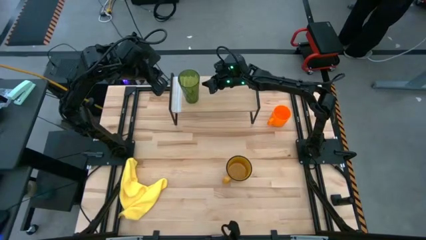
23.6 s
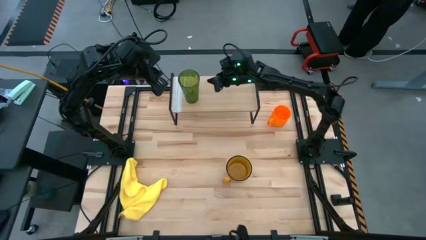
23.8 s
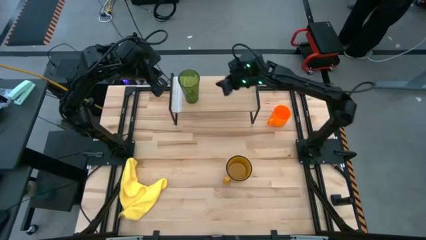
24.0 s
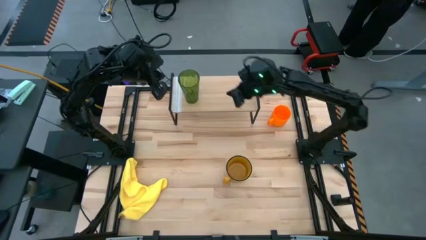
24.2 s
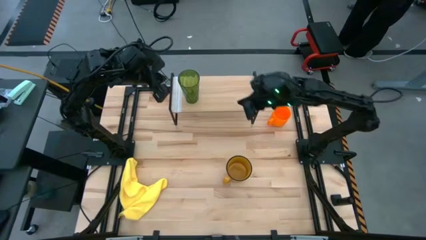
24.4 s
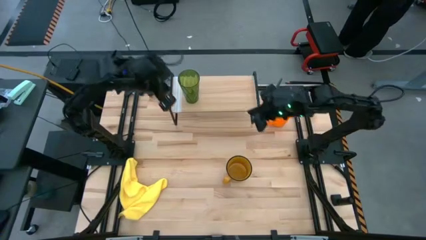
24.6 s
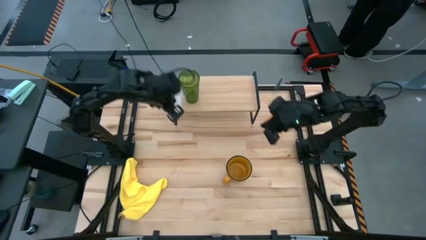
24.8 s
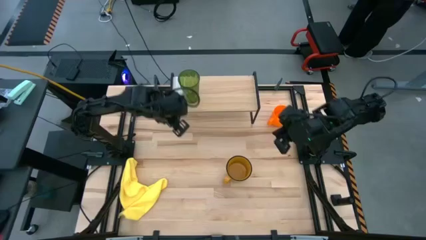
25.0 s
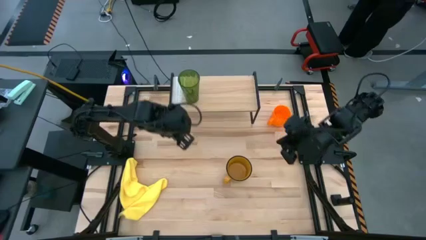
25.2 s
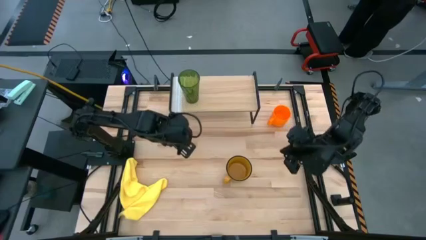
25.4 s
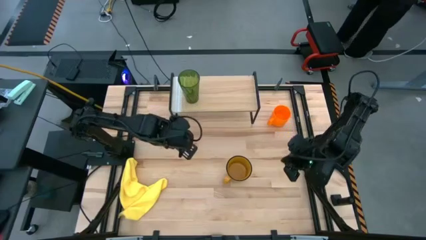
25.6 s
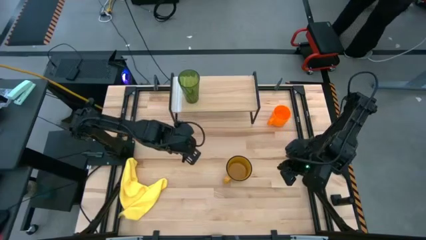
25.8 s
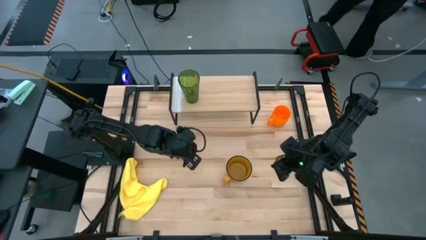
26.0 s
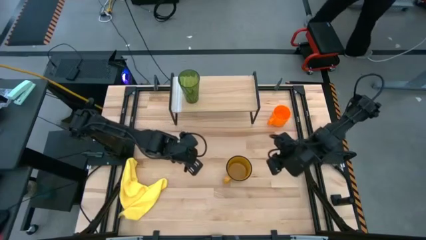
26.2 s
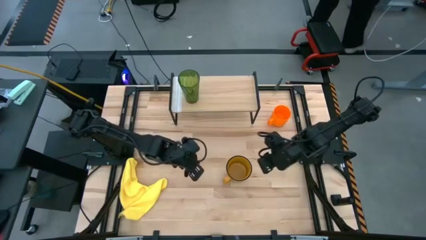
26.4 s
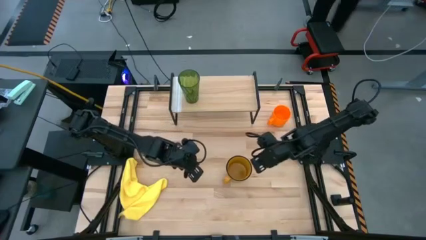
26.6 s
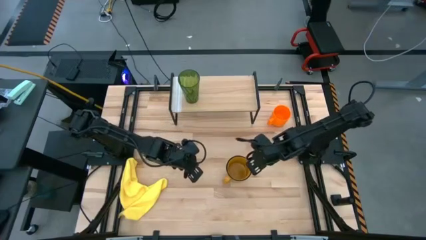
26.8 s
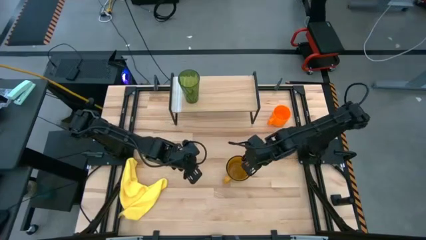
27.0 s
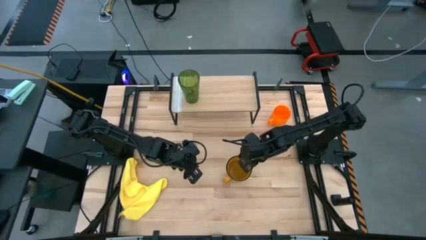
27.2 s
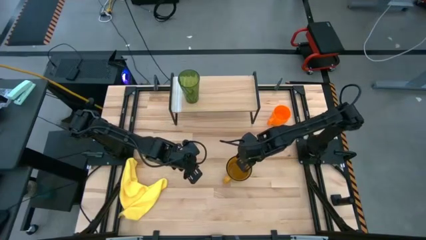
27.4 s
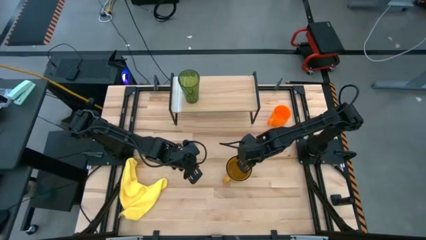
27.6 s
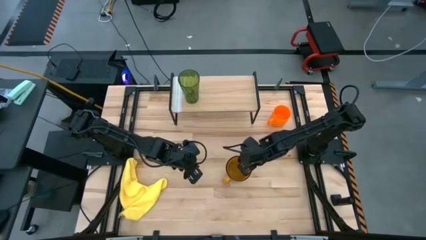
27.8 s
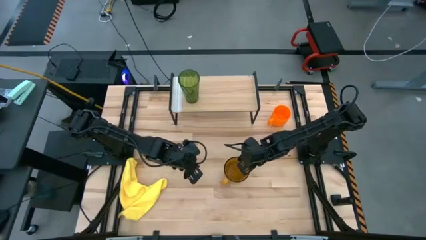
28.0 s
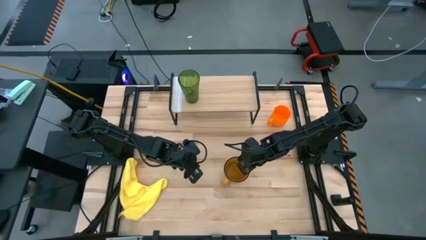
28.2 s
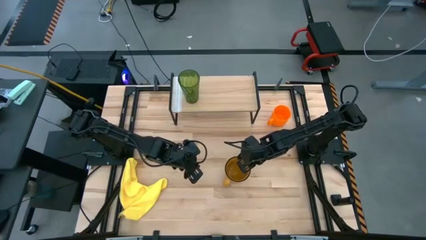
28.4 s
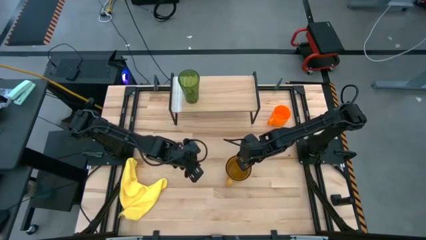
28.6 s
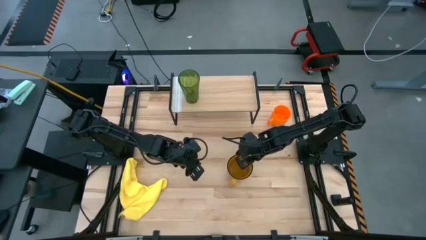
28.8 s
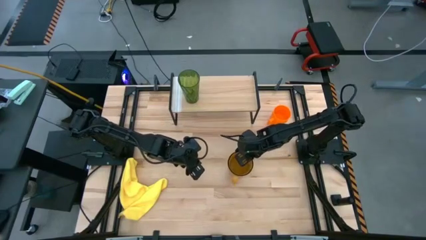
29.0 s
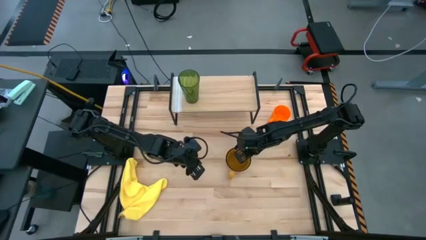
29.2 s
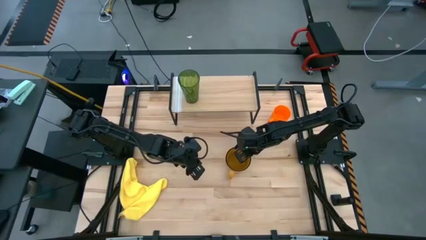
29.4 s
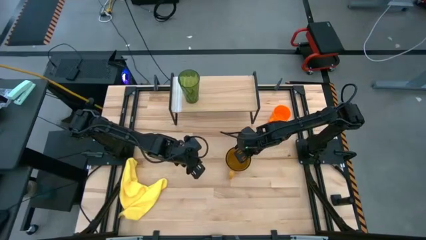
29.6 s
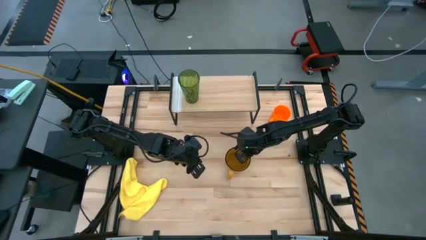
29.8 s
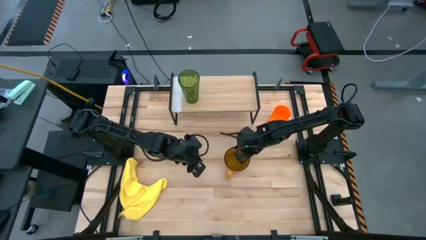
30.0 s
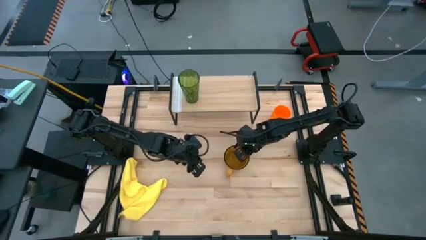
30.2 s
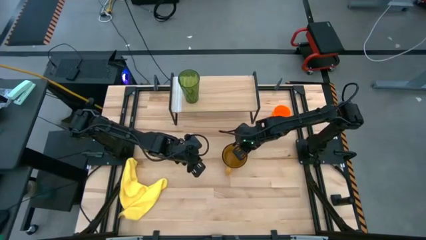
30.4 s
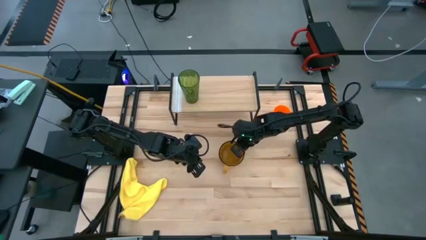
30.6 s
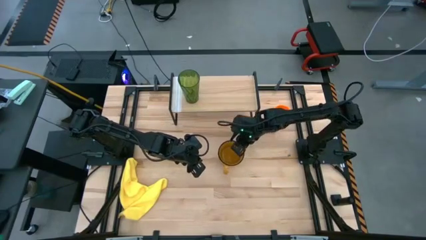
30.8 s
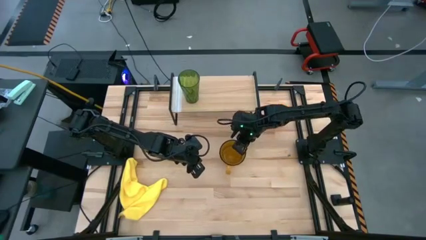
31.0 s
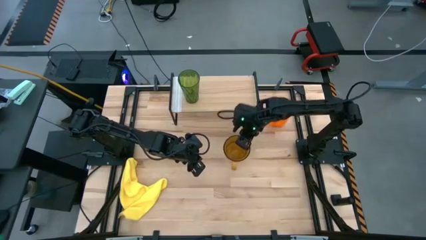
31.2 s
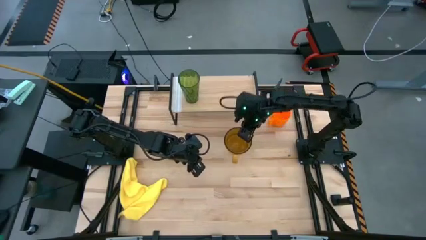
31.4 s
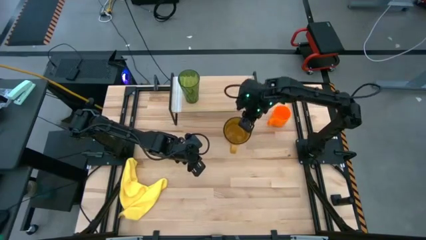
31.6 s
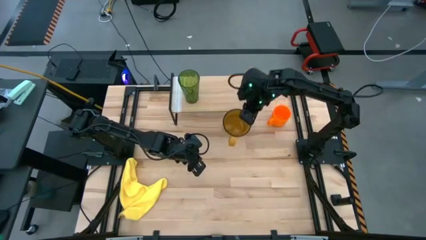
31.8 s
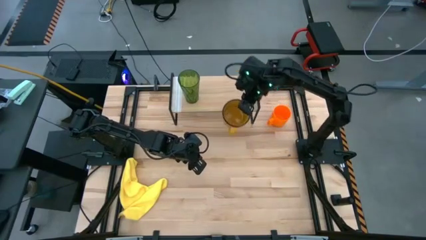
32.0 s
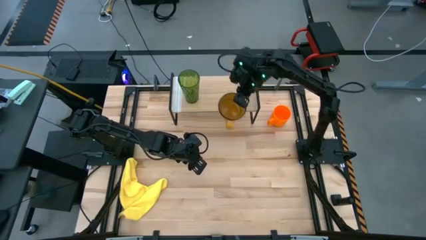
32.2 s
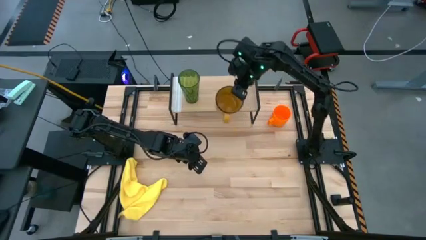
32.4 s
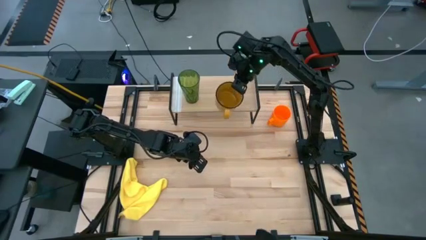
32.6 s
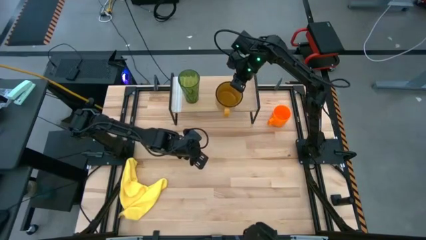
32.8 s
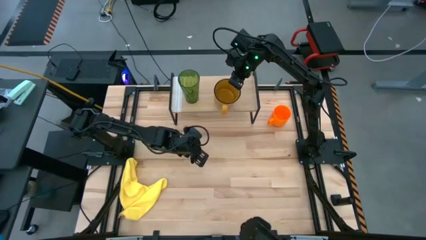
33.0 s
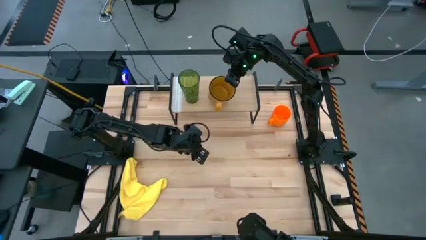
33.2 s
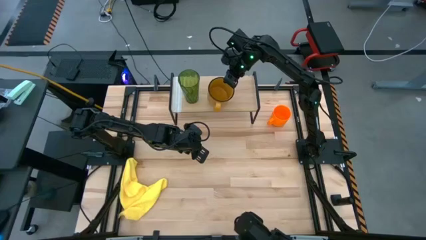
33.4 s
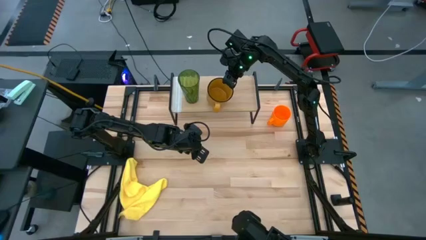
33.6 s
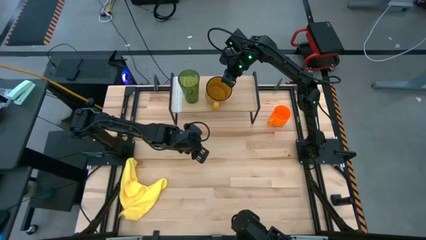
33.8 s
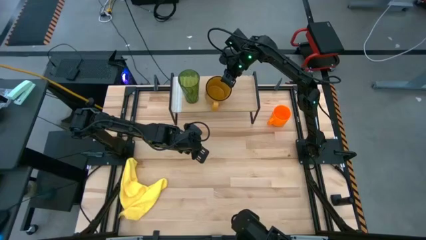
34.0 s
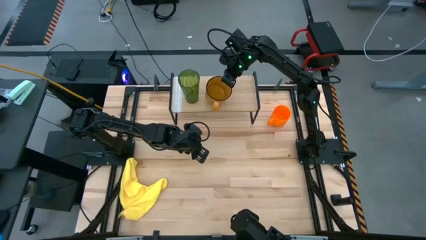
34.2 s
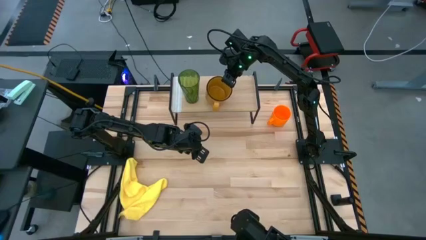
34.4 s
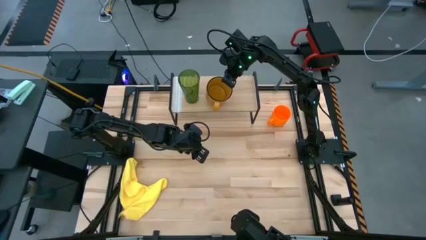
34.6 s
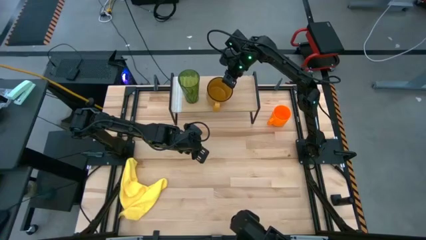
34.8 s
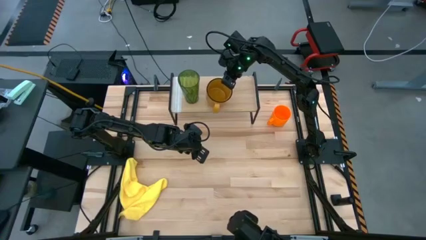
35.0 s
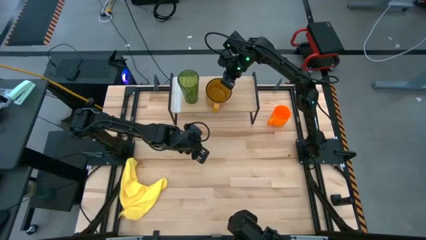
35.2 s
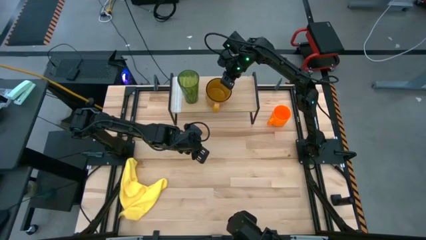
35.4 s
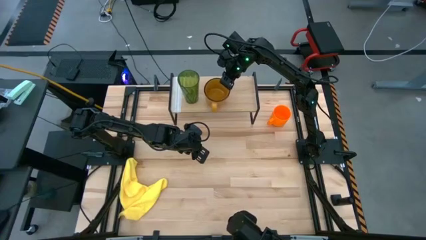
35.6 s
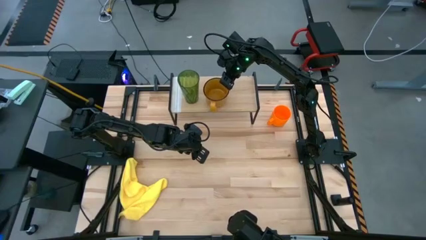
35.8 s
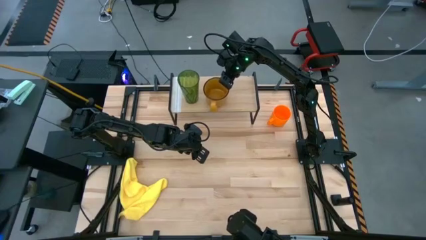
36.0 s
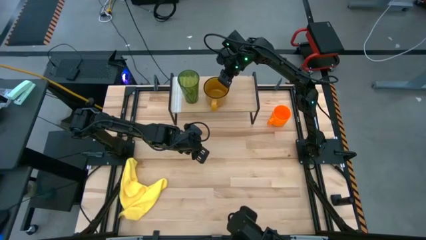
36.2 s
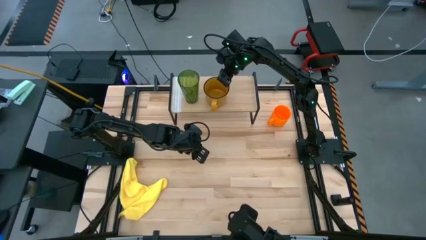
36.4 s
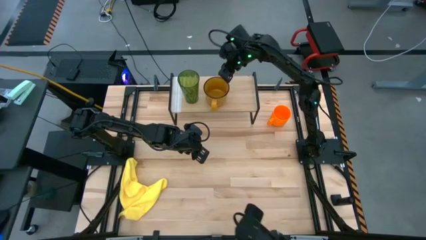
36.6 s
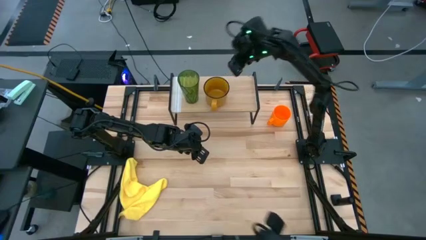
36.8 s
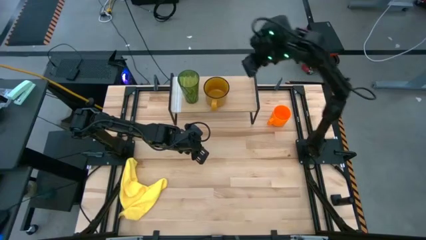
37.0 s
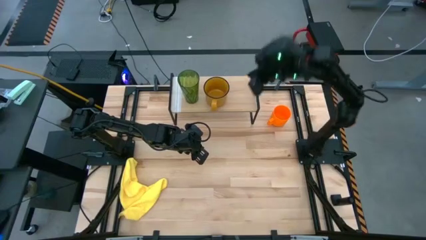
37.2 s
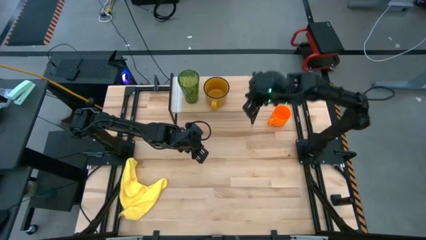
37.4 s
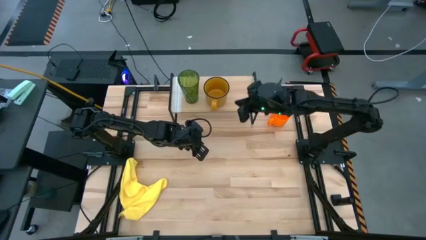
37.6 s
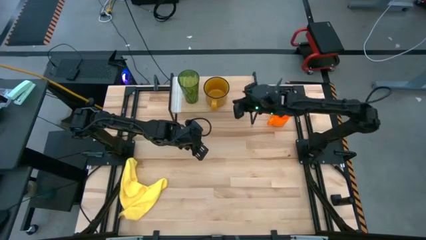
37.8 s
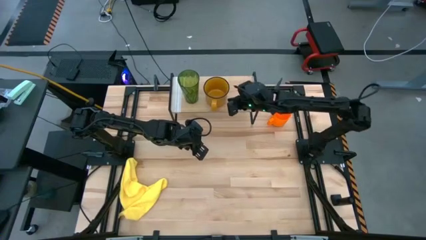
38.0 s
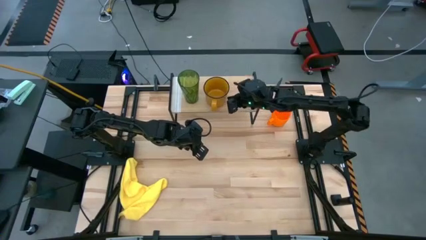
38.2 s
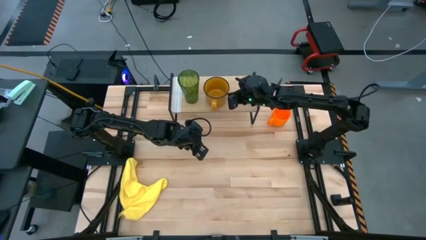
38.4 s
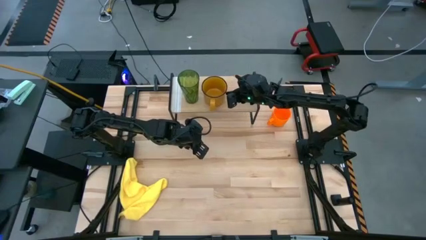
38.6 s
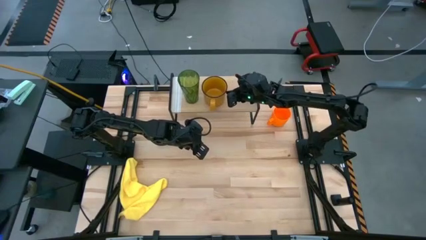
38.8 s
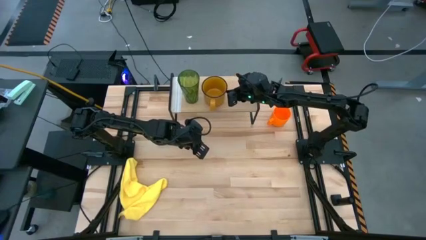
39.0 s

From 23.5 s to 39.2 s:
Task: Stack small to large cups/mugs on shelf
Put the yellow mug on the shelf
